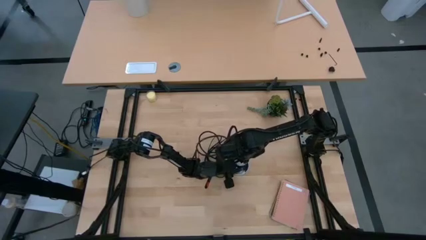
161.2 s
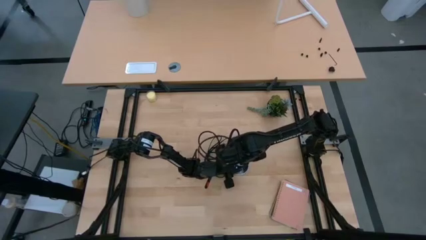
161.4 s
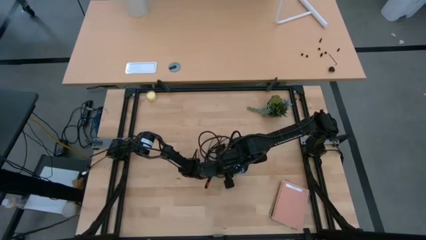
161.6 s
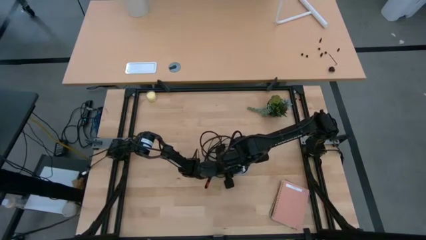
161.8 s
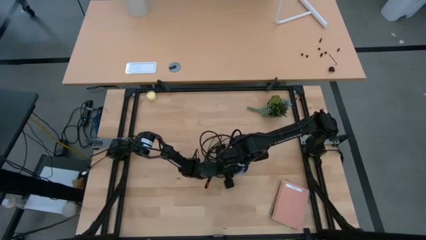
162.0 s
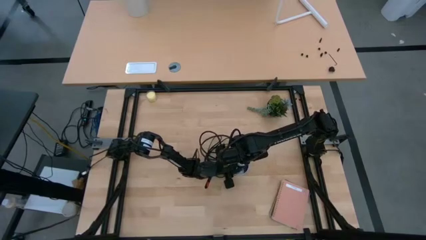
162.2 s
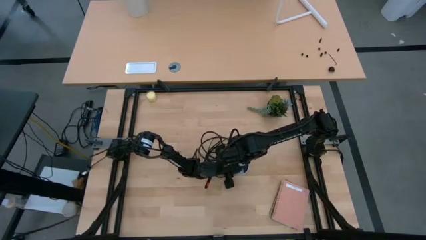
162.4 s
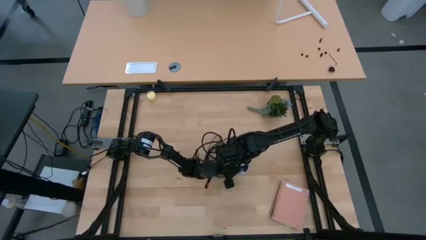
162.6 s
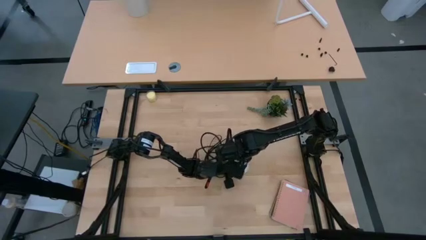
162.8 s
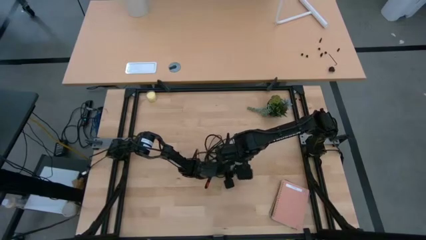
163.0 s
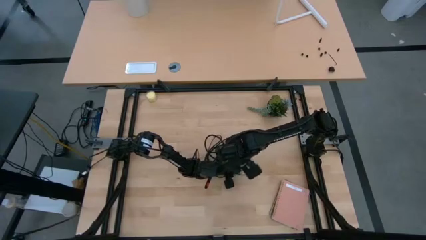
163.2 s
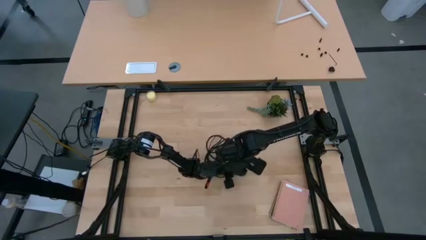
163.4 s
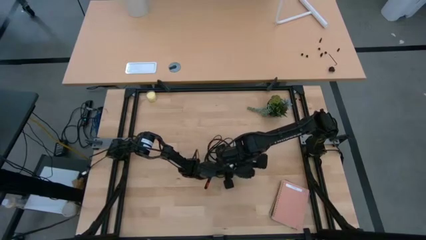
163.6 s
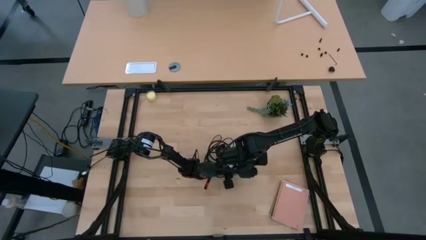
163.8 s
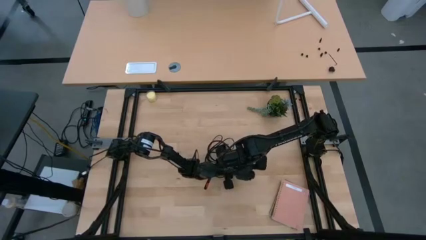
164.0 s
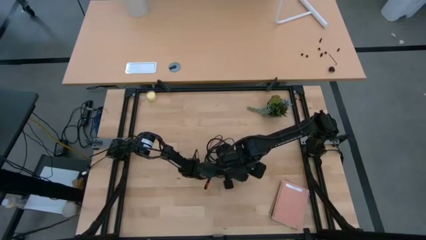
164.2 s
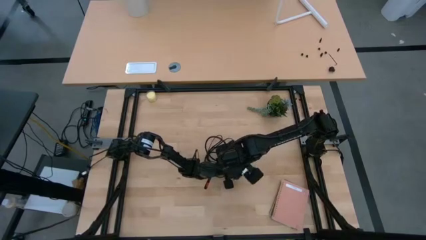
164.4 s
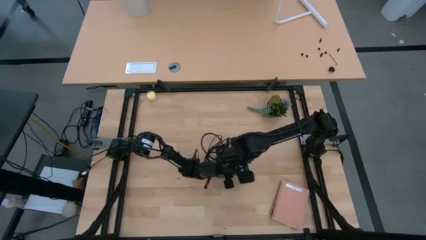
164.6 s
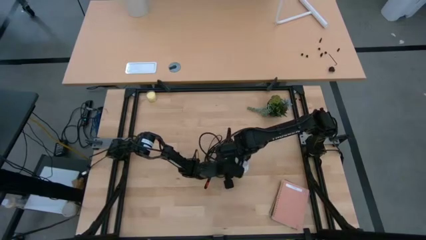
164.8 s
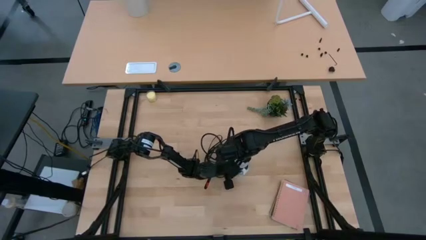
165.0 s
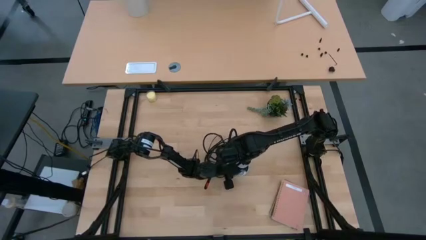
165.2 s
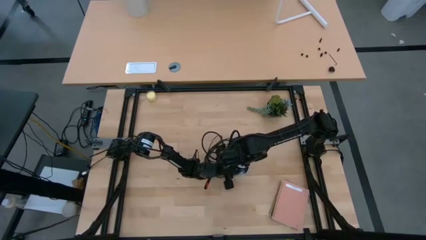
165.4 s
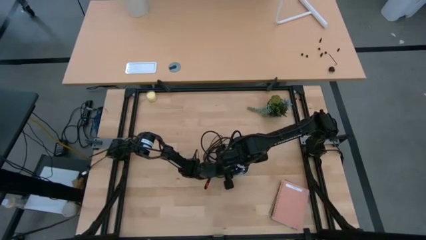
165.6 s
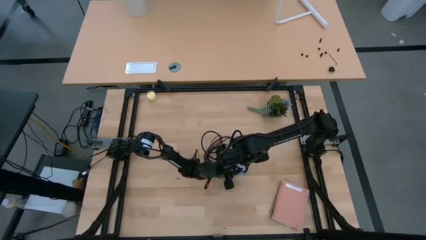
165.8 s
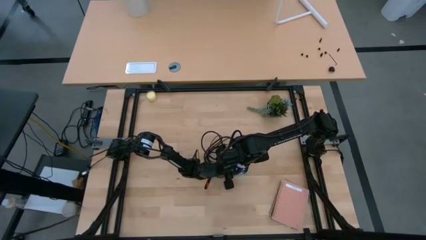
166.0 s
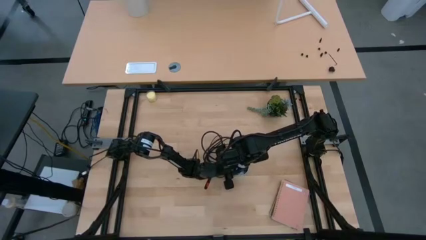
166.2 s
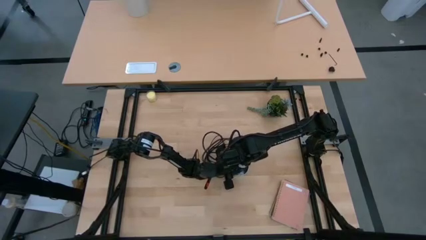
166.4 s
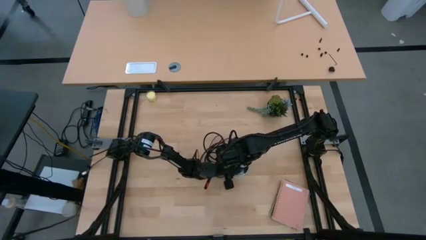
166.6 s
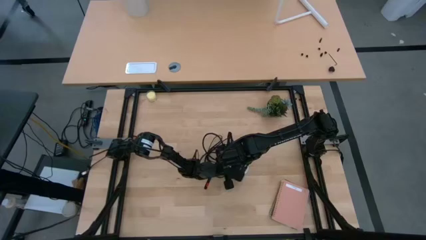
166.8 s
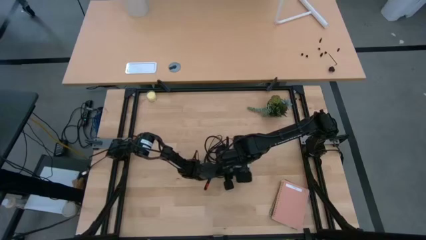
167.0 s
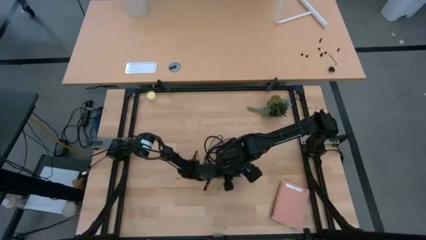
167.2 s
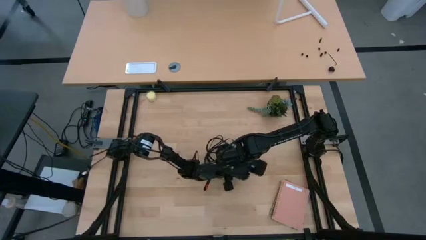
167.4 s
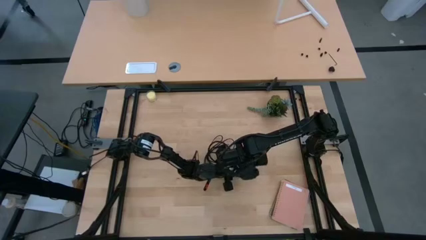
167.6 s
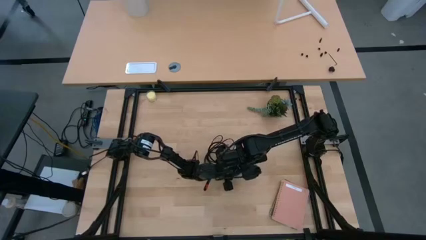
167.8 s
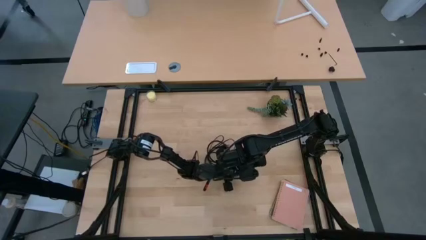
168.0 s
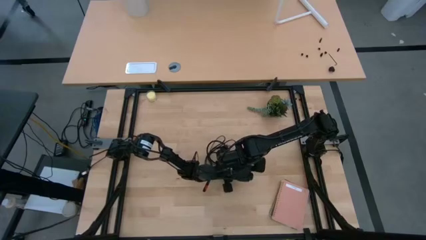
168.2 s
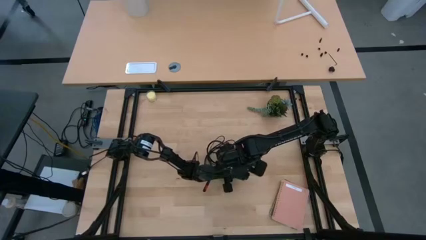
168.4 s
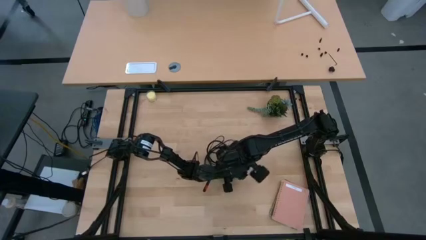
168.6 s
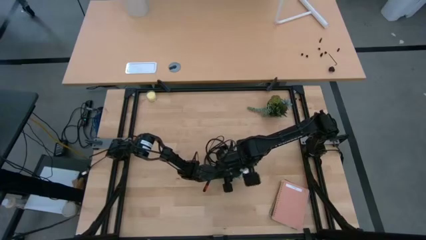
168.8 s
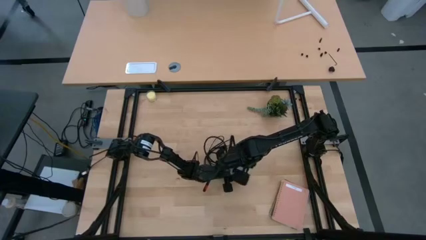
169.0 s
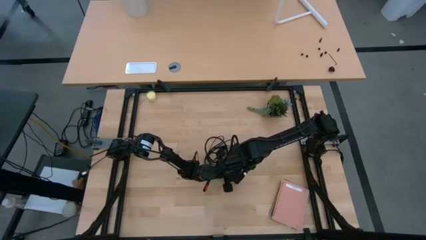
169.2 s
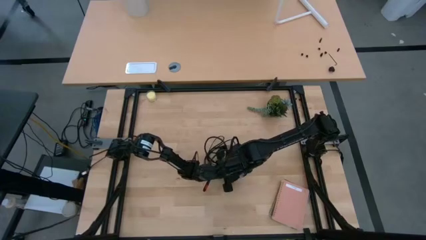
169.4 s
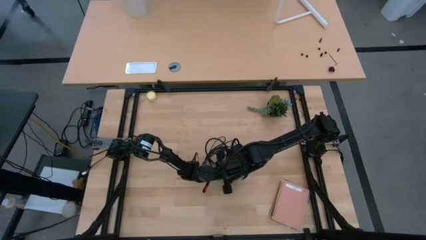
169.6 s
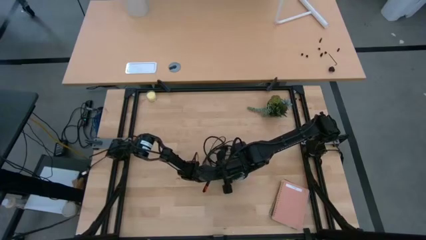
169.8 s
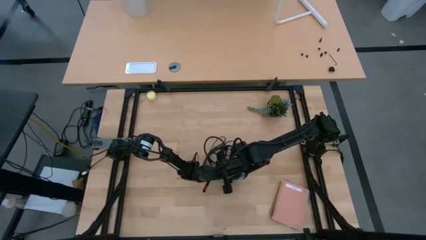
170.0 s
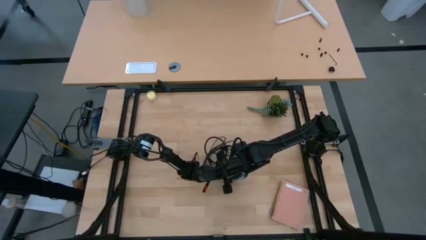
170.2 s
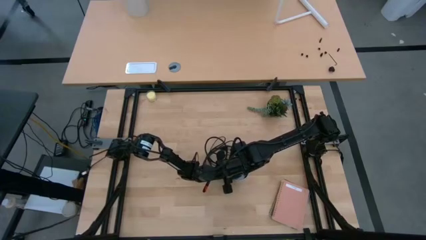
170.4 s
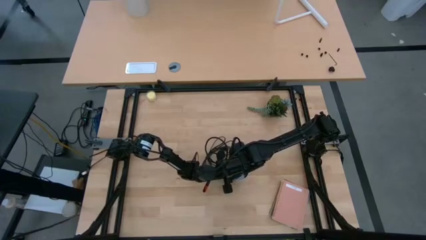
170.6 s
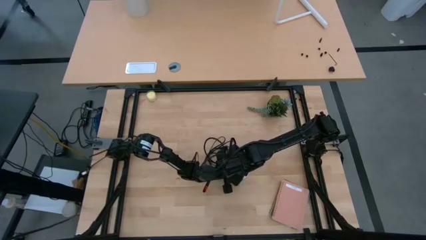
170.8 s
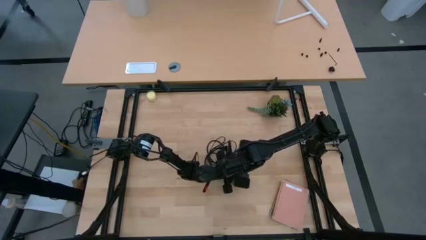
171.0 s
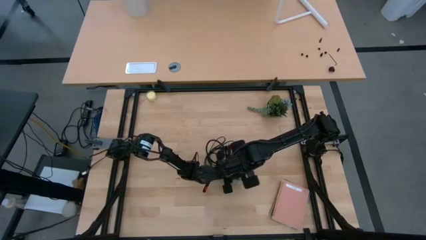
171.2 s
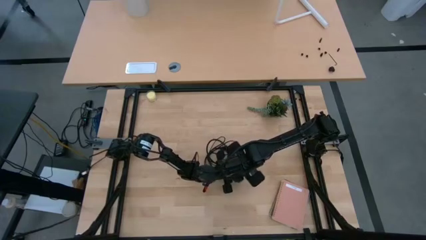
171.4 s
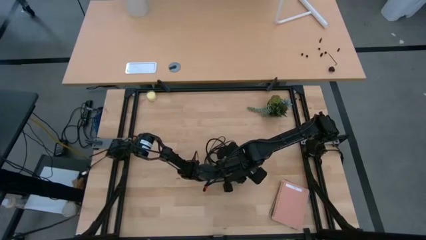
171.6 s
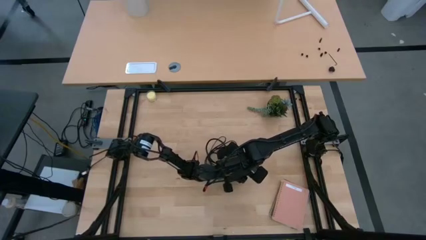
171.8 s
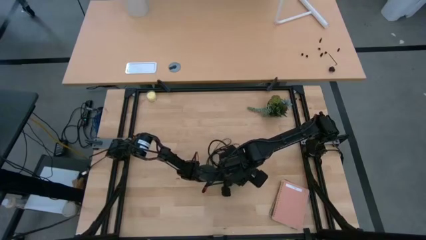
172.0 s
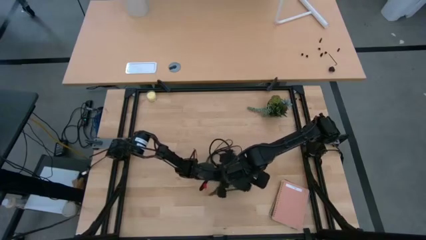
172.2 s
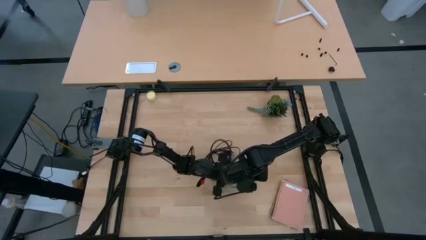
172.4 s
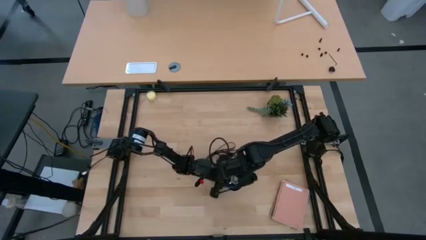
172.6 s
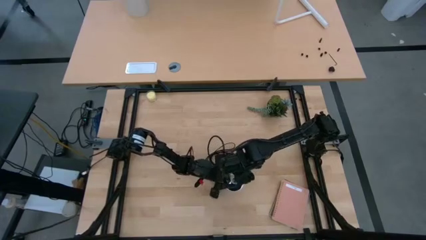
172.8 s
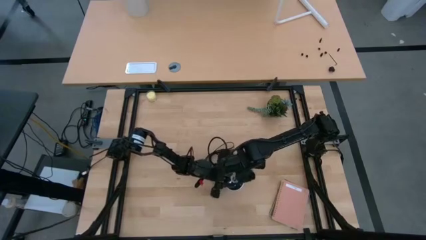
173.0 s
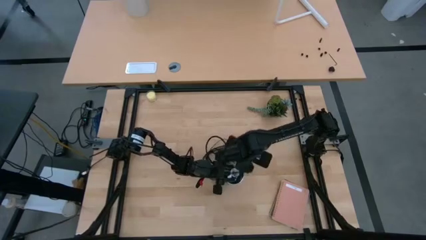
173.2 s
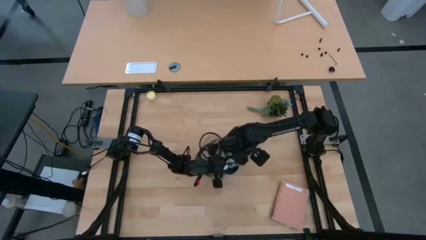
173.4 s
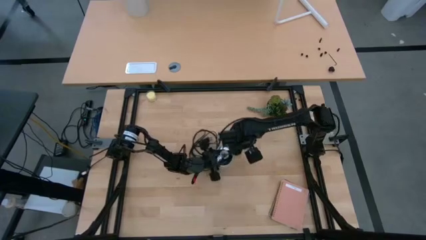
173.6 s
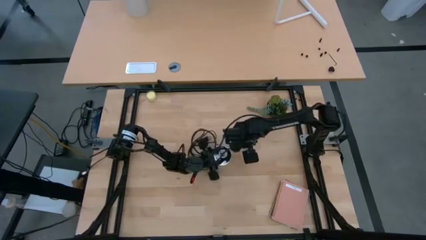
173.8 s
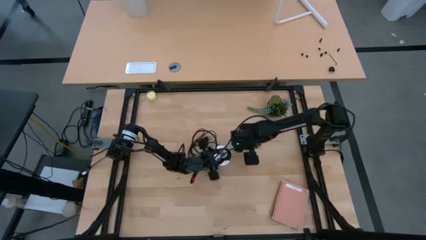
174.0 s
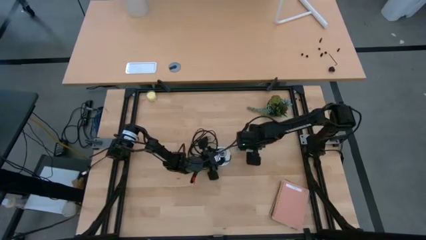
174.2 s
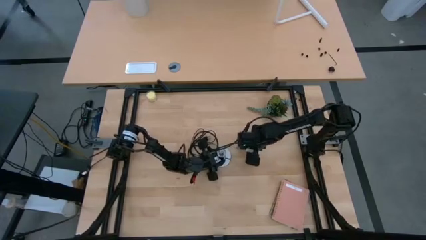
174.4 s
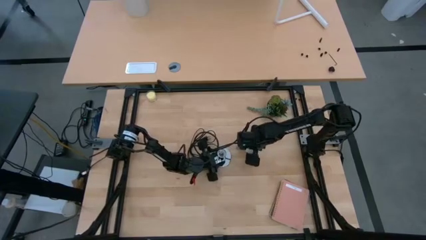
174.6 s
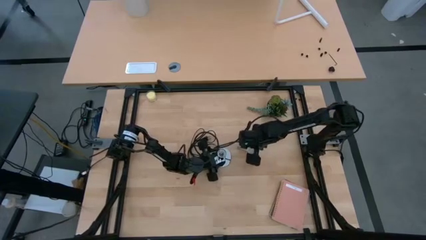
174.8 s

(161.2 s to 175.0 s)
Task: Screw lightbulb
Remove the light bulb from the lamp

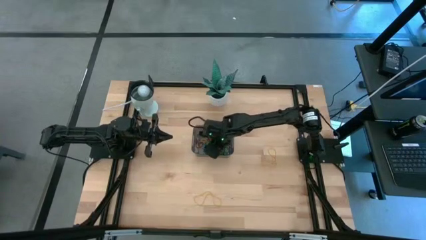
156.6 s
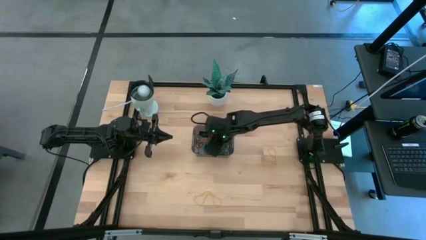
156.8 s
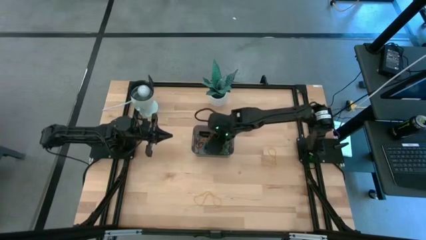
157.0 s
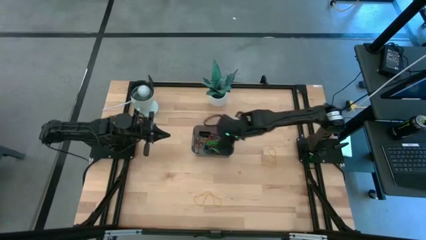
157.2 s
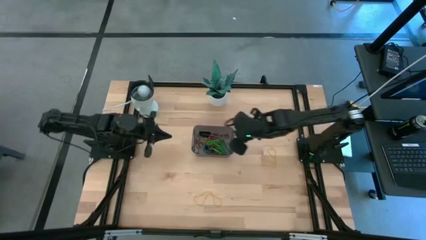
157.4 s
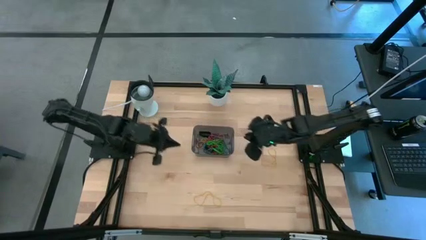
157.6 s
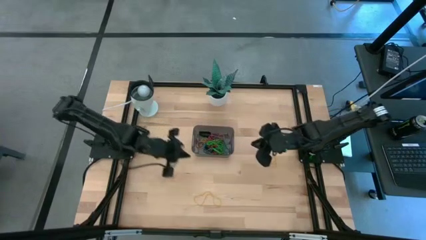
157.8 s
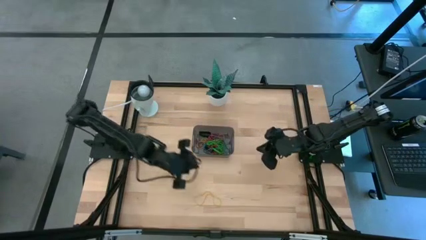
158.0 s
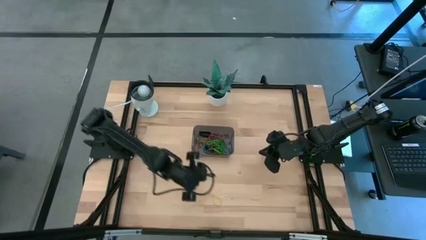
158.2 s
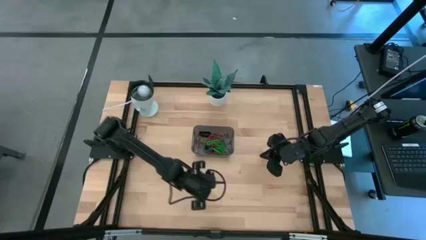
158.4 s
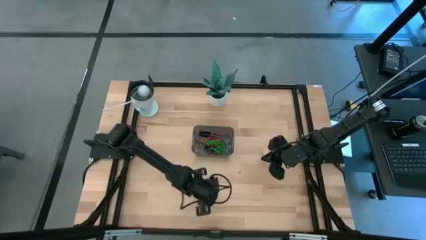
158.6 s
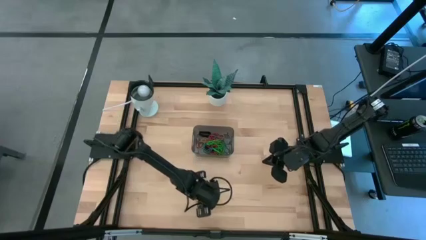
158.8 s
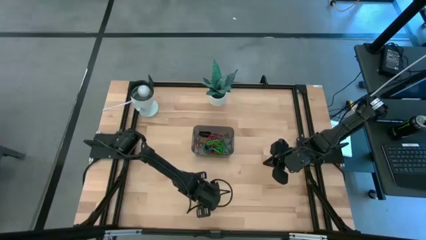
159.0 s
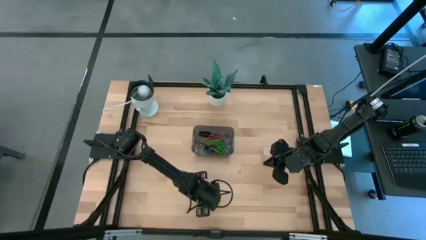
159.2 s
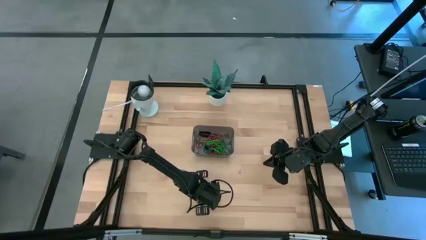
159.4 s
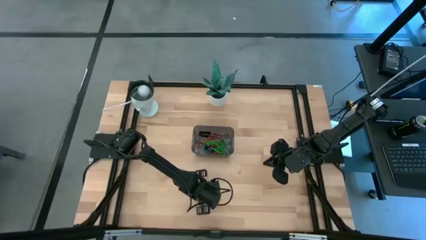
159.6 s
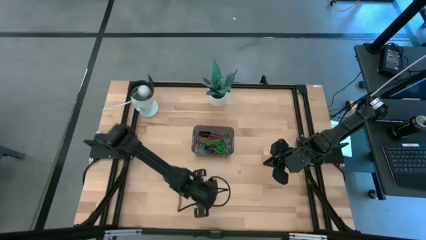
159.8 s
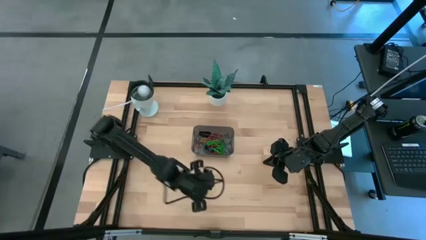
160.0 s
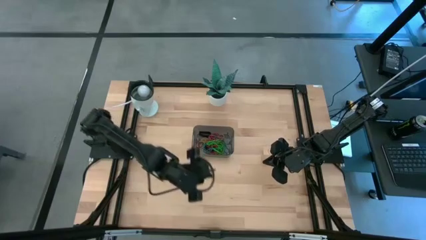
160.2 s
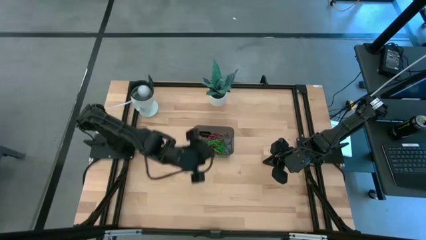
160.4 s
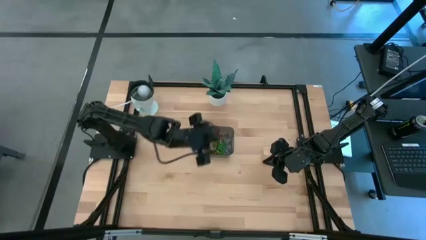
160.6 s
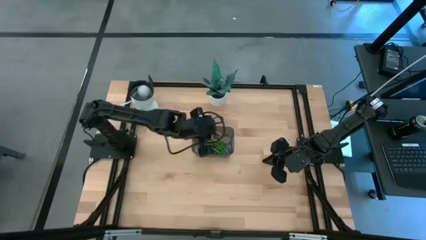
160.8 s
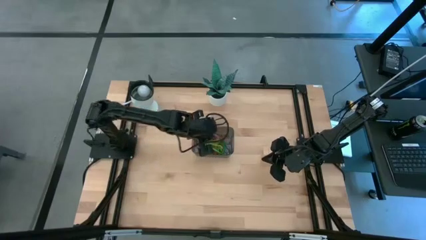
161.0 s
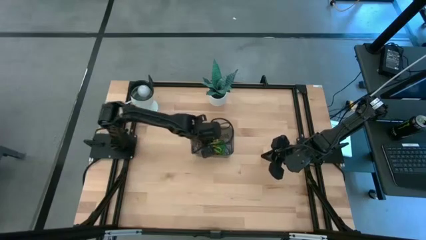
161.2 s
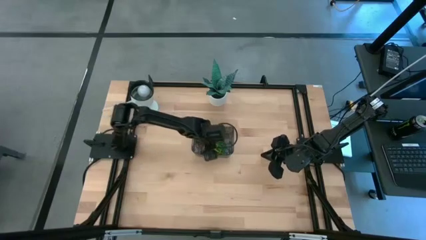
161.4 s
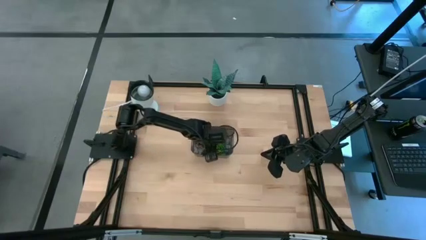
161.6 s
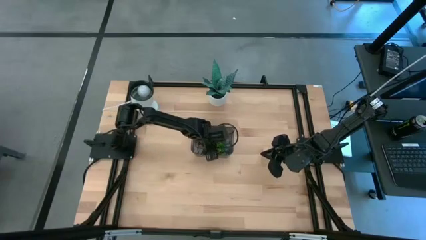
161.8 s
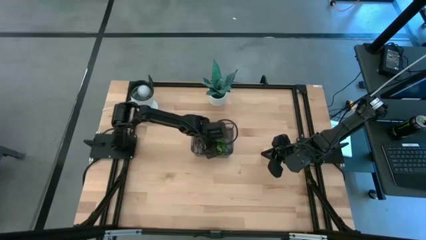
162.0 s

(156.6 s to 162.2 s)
Task: Pick and place rubber bands into bin
Put the yellow rubber band into the black bin
